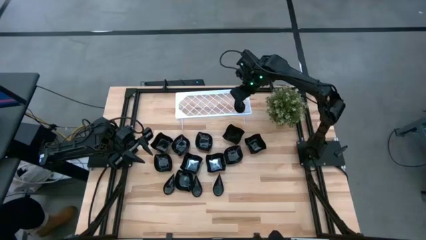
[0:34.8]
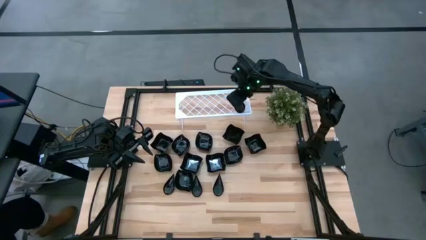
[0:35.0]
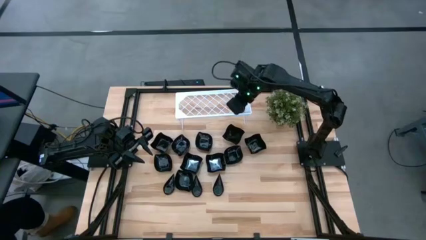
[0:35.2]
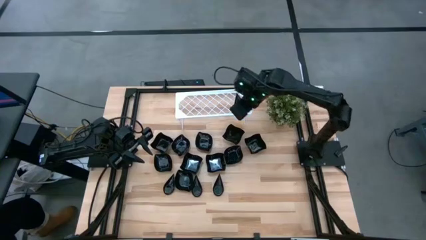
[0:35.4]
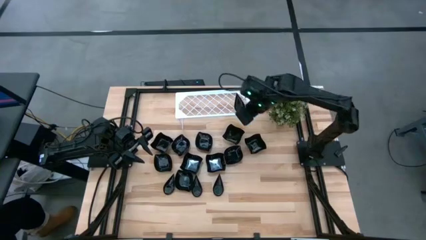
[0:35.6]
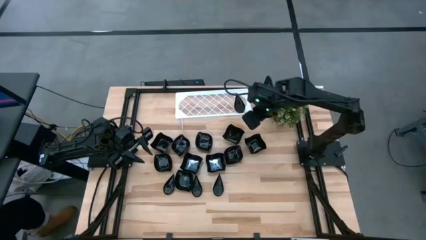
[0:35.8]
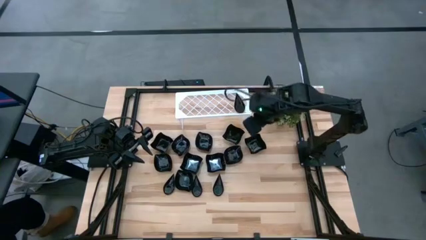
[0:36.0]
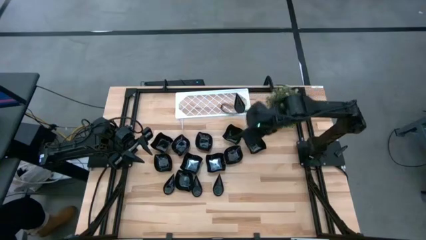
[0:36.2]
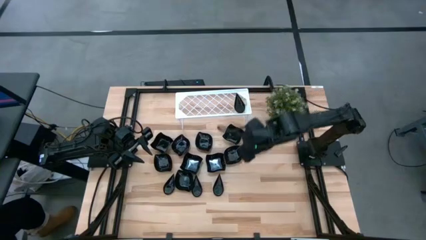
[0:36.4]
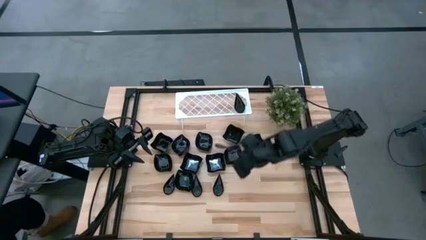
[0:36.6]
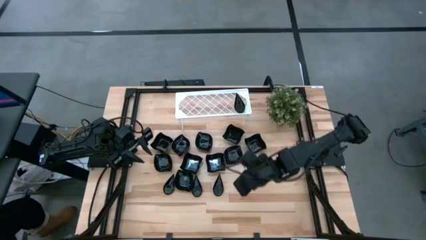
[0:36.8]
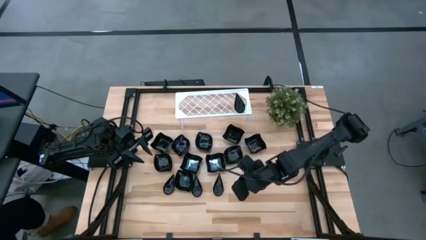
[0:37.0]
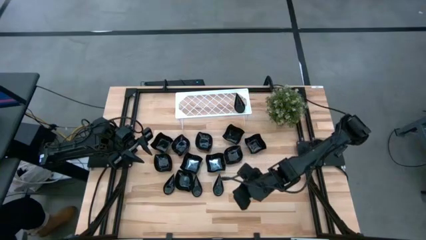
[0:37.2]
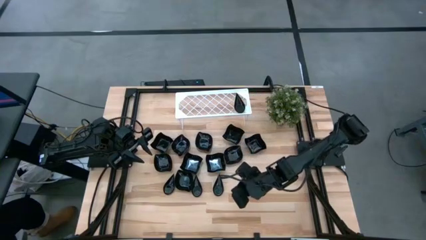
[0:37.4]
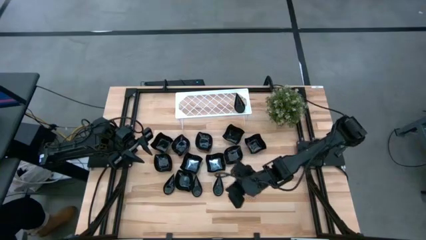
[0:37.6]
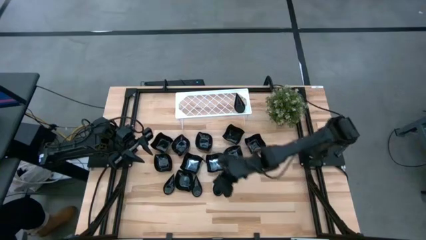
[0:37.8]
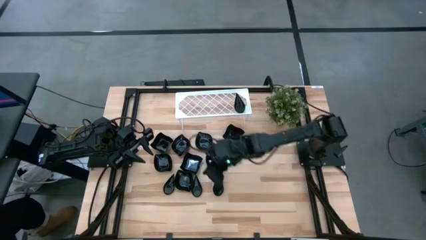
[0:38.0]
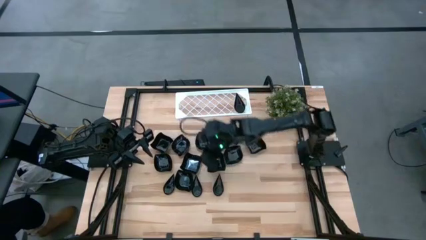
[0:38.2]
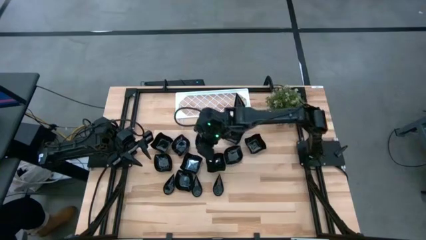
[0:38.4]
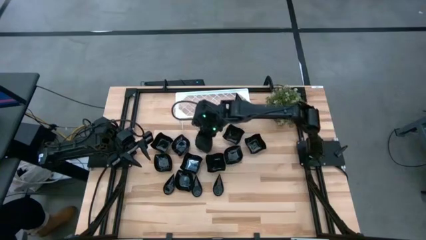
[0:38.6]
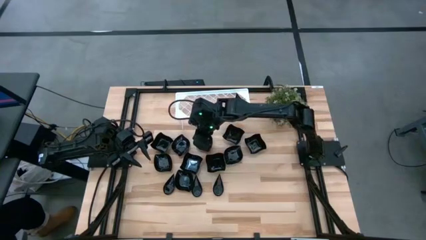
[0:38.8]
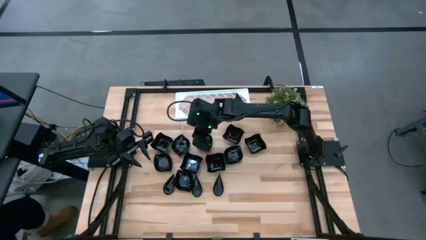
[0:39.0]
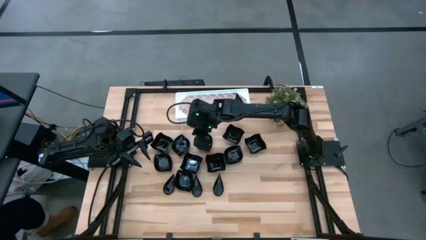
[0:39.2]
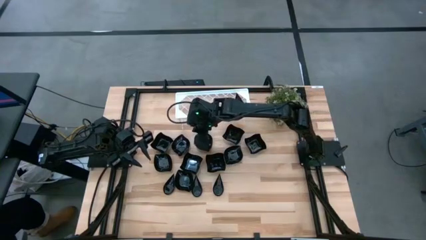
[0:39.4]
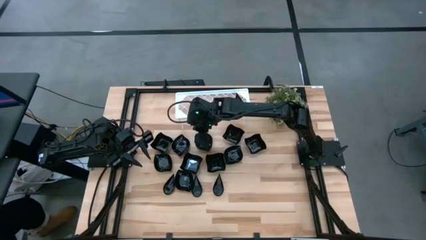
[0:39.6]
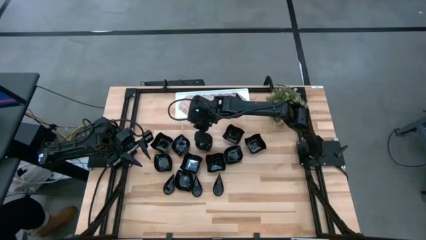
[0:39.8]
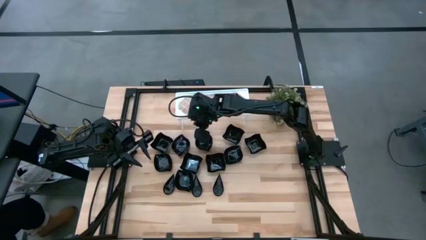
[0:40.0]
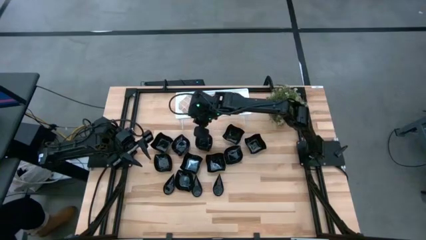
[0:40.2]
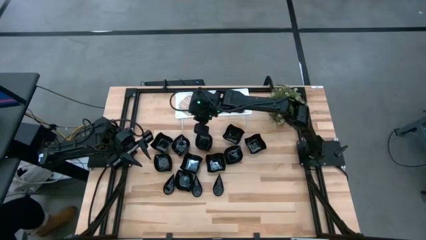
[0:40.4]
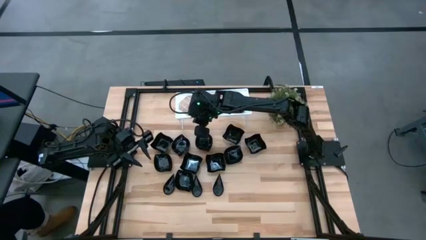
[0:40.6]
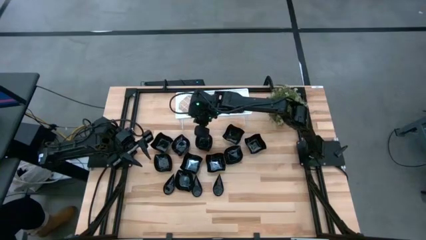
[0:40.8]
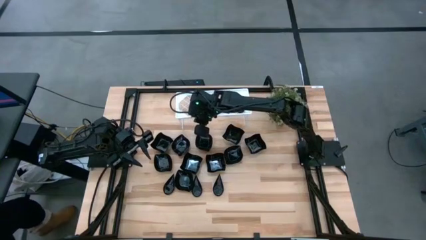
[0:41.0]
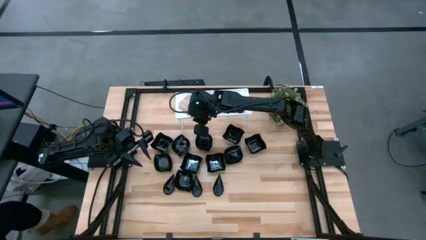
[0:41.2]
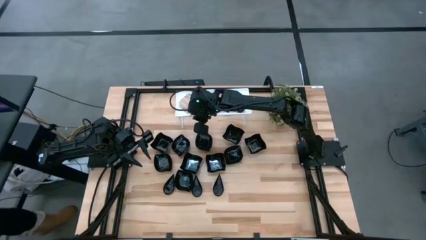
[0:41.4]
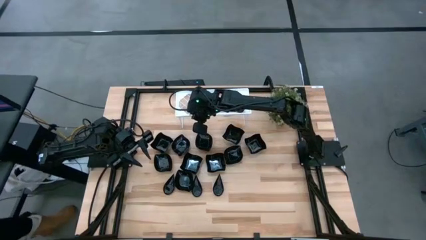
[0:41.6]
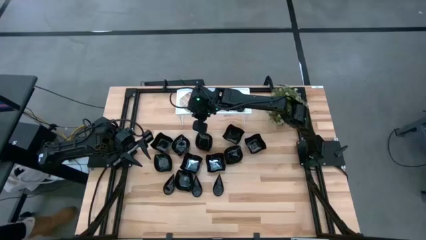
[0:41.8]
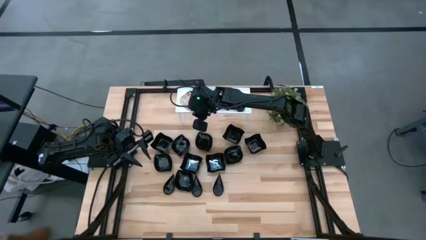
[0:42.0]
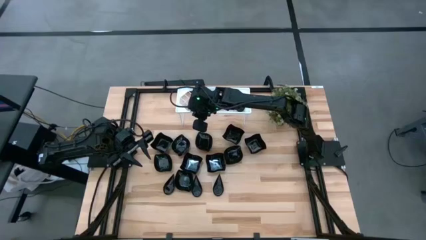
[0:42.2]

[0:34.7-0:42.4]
Task: Pick & Place Mini shaped plates
Adjust the shelf

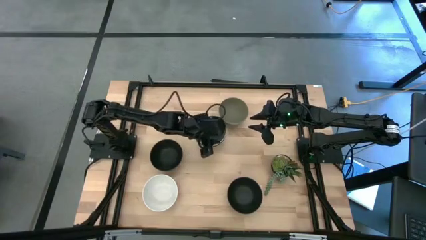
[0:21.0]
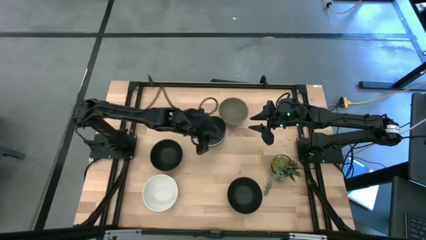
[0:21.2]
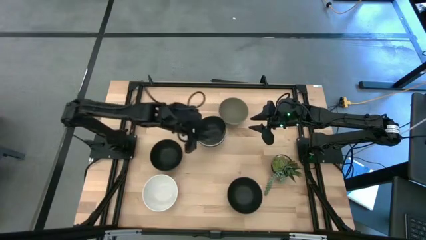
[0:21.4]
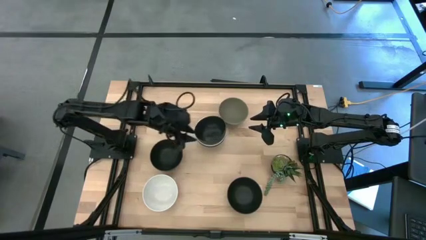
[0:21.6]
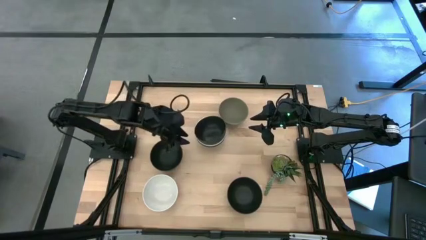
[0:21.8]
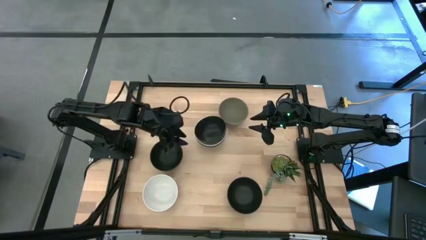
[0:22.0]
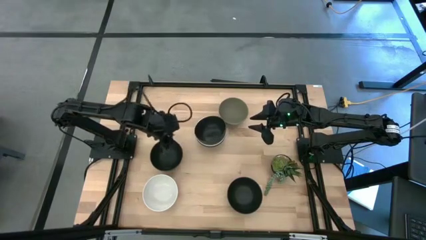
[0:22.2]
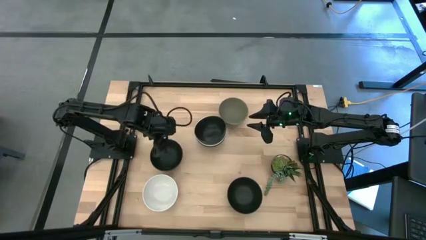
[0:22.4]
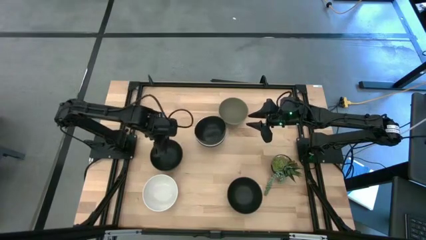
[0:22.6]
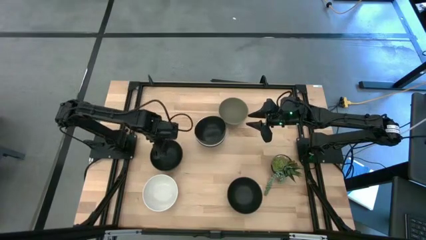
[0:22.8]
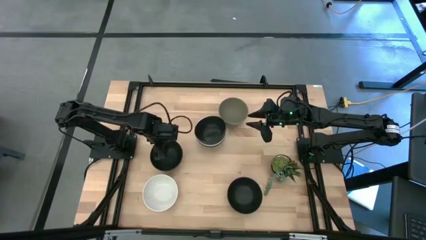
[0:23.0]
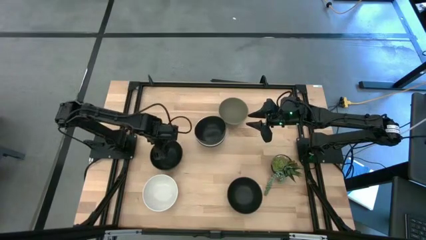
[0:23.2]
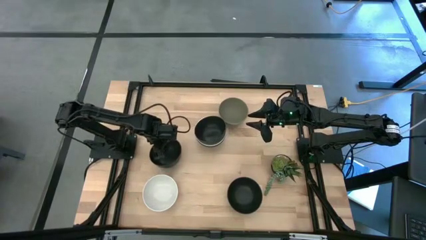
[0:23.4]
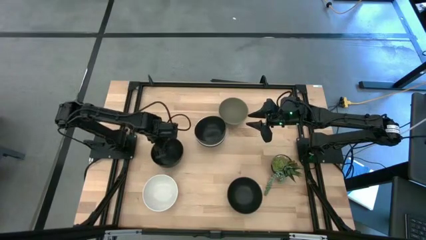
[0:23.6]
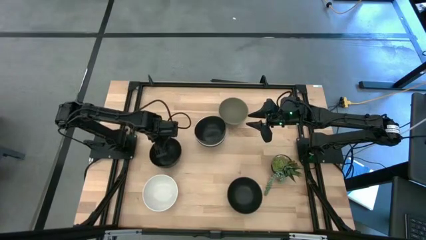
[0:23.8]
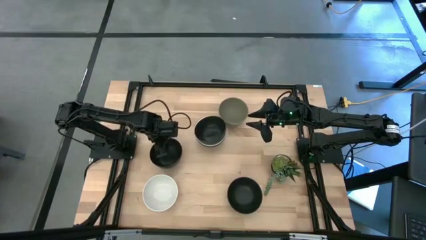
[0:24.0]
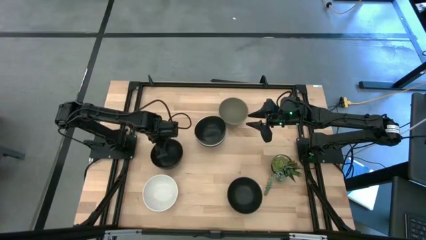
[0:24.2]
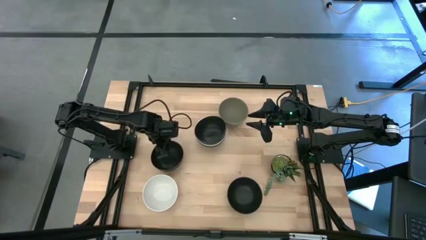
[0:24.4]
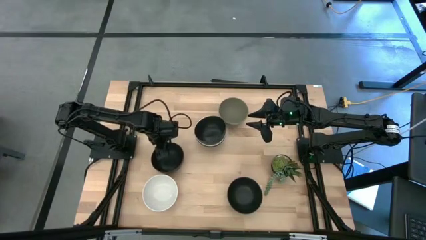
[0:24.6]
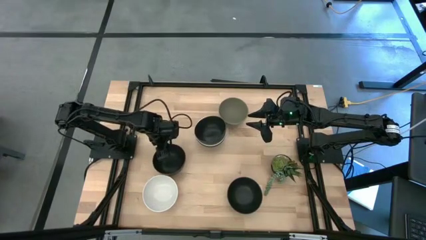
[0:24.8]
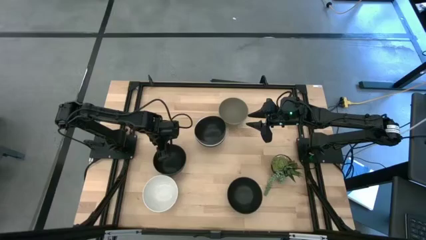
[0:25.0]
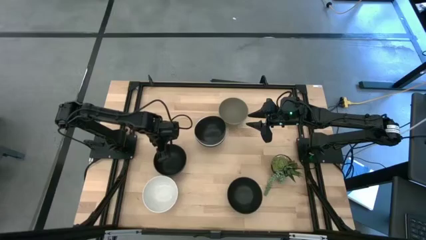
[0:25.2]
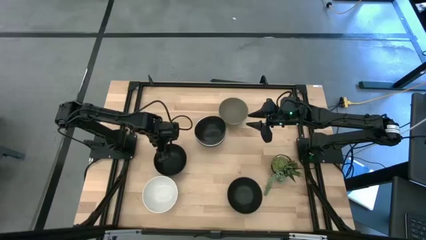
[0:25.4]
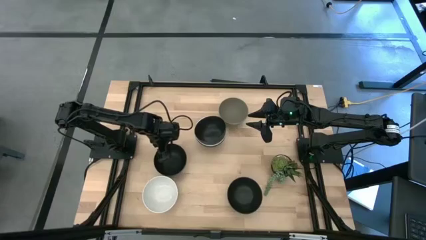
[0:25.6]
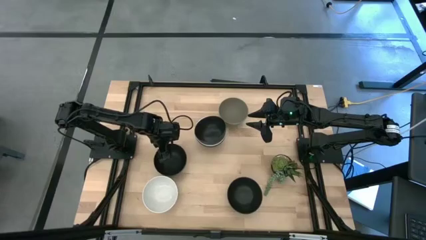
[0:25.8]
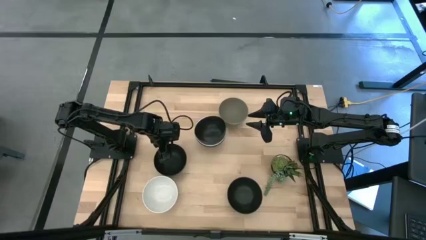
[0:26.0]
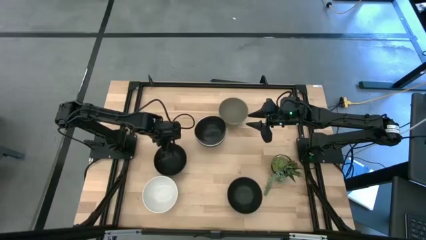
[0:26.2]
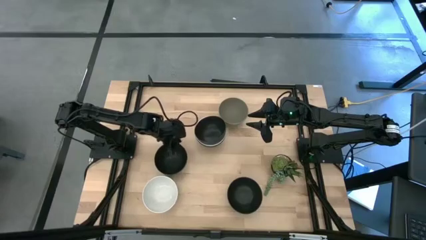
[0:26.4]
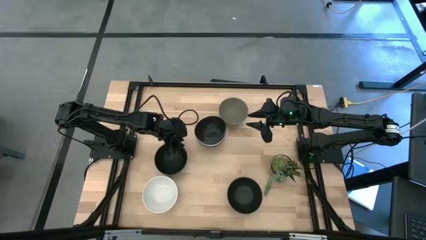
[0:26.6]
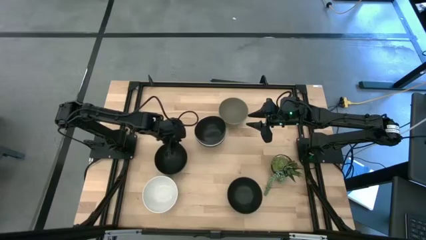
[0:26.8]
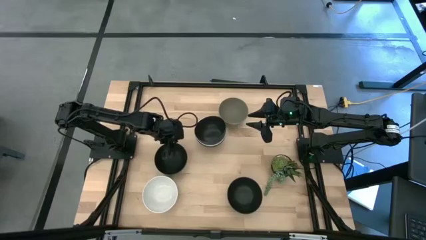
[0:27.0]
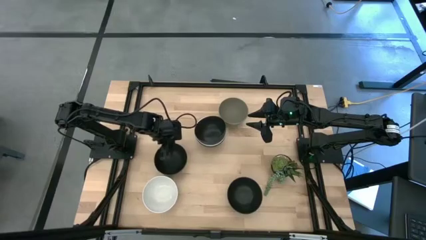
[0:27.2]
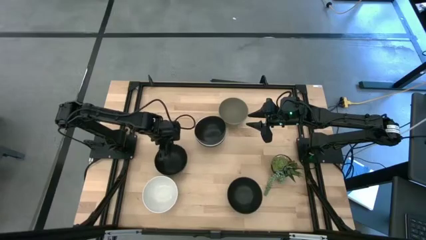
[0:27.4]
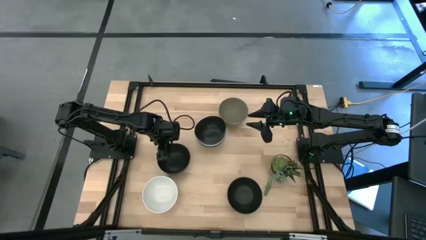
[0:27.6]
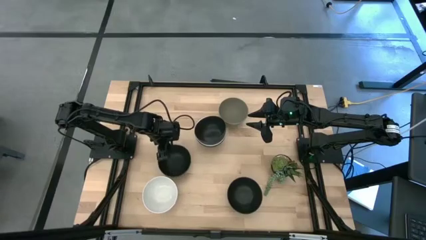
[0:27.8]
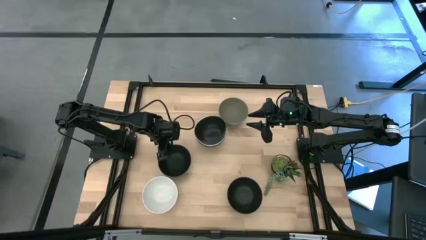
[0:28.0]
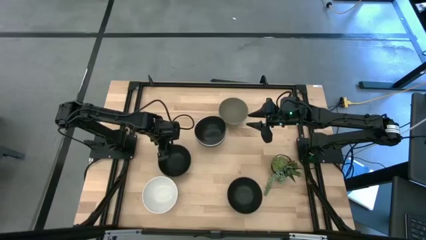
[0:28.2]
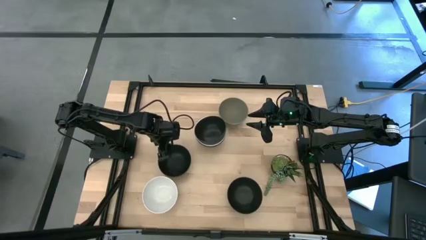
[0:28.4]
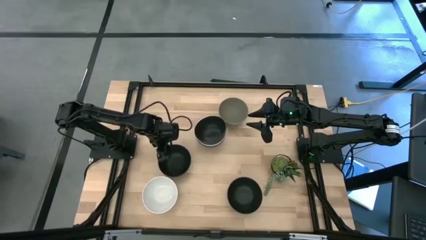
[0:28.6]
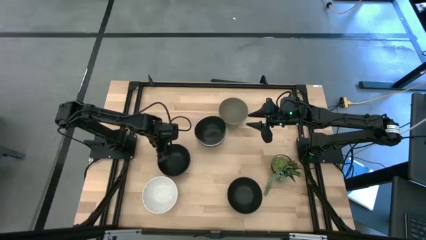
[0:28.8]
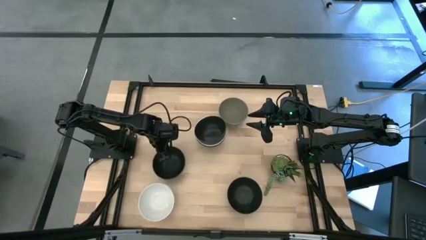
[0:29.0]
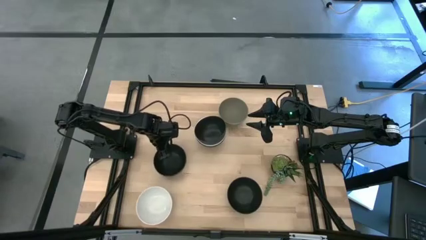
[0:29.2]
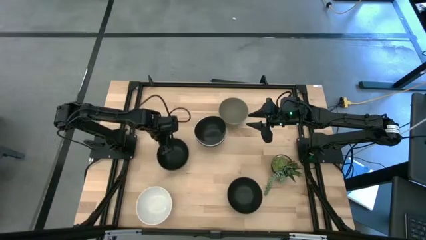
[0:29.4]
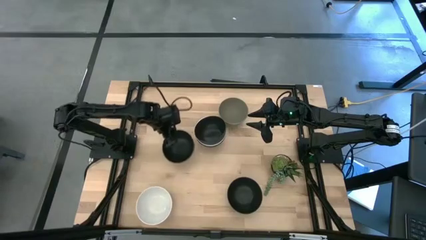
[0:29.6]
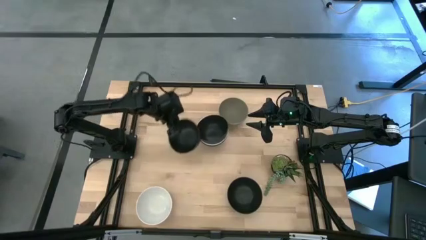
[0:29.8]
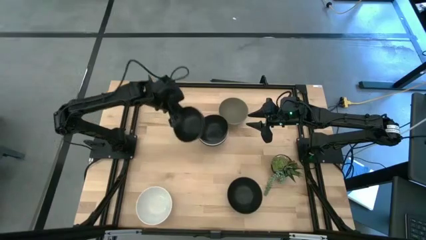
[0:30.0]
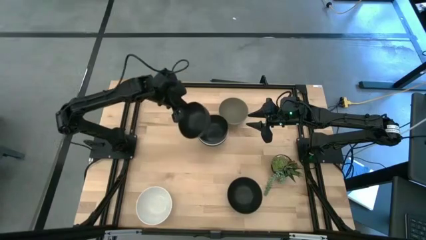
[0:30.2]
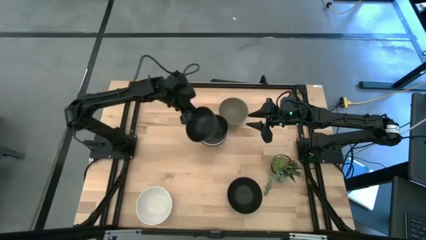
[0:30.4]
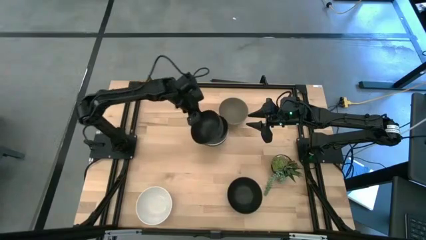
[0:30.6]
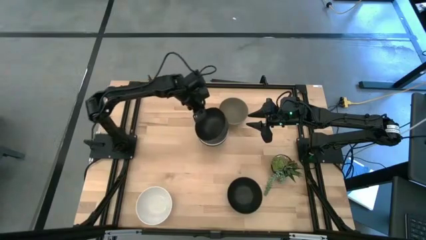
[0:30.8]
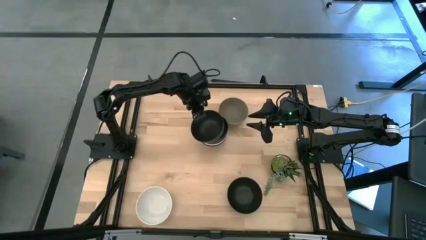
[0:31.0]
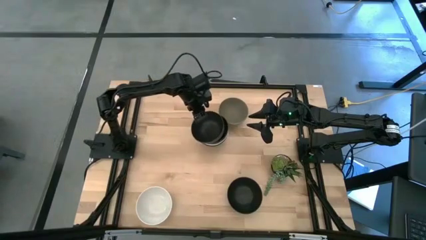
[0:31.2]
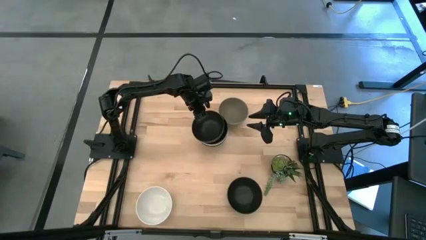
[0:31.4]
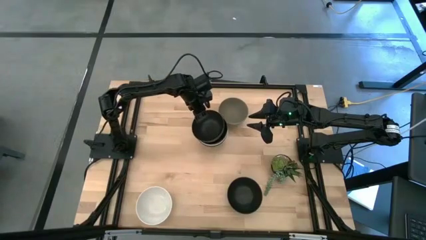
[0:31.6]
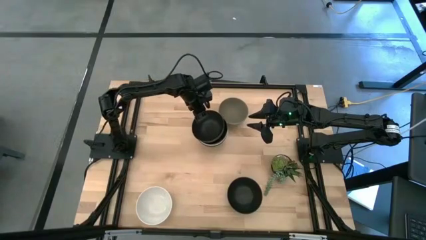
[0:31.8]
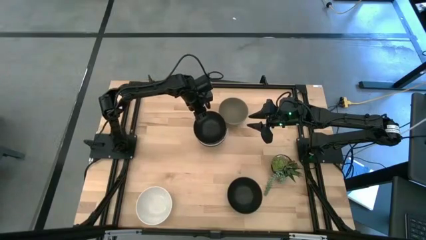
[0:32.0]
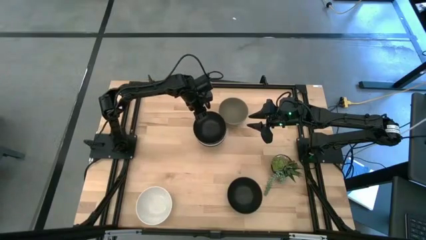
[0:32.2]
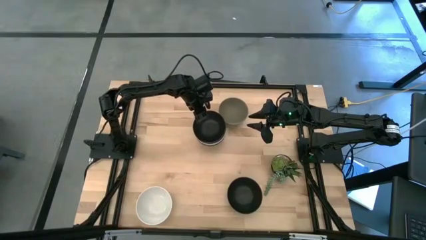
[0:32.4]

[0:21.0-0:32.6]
Task: Nest bowls inside each other
Stack the black bowl on the black bowl
